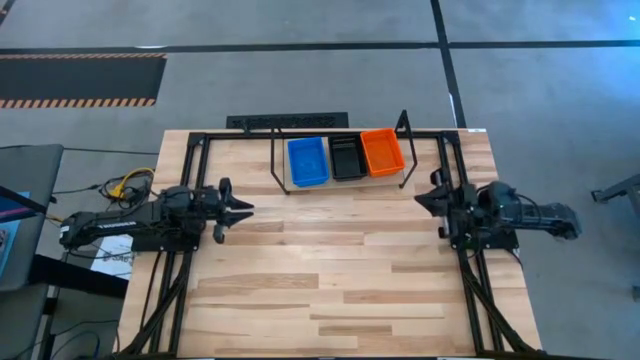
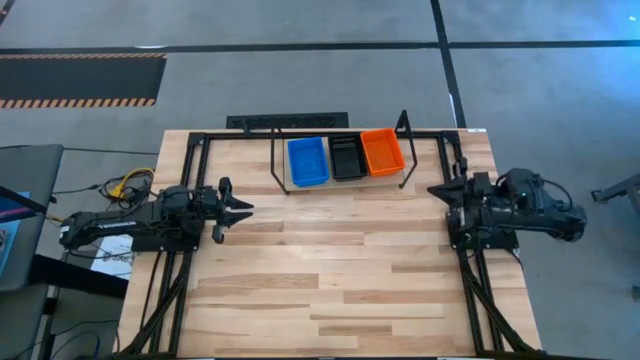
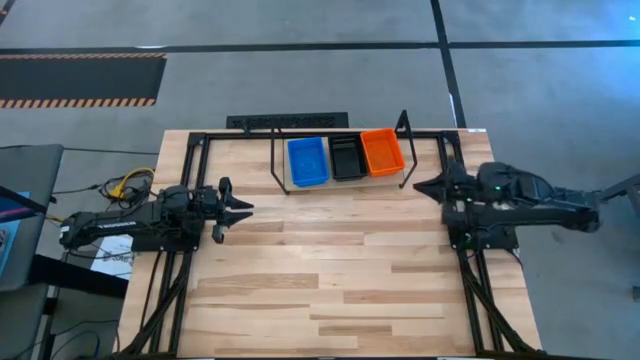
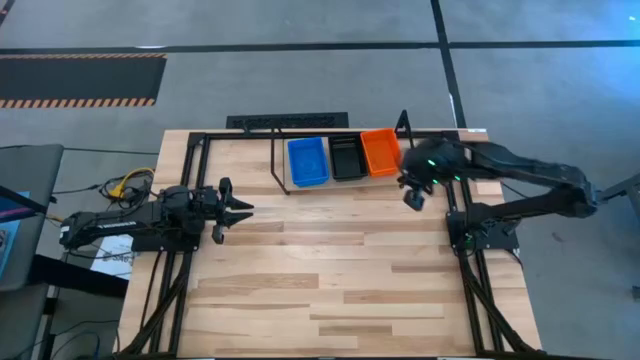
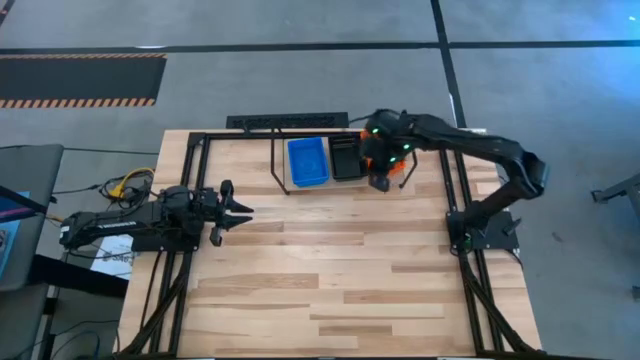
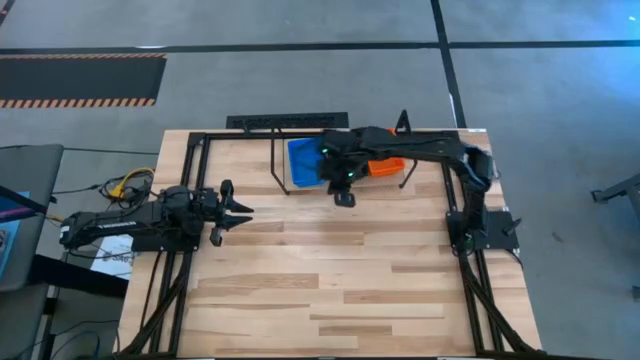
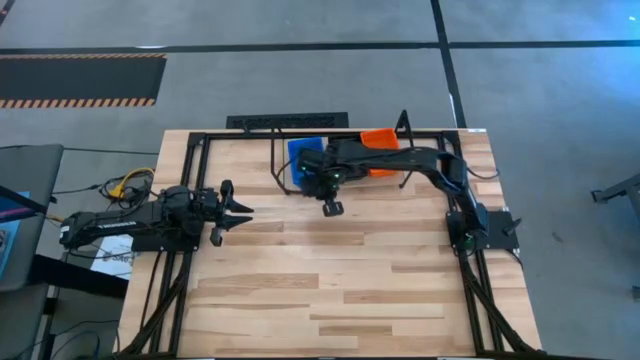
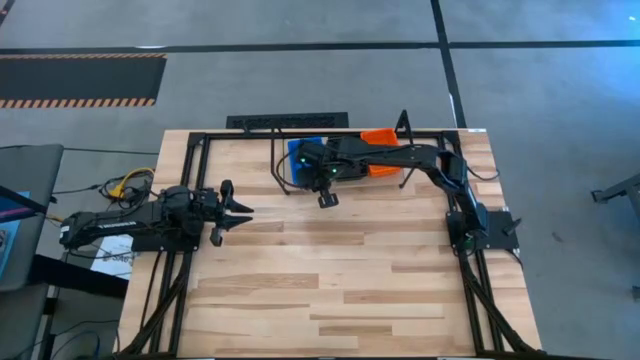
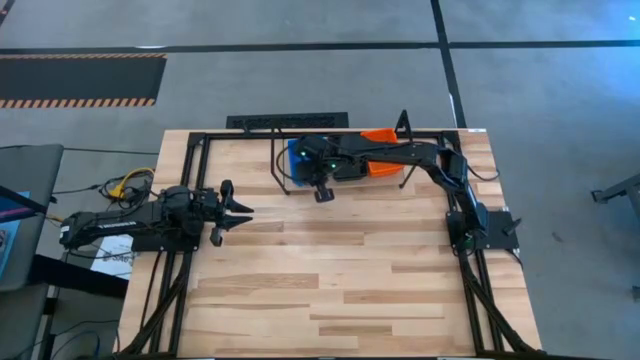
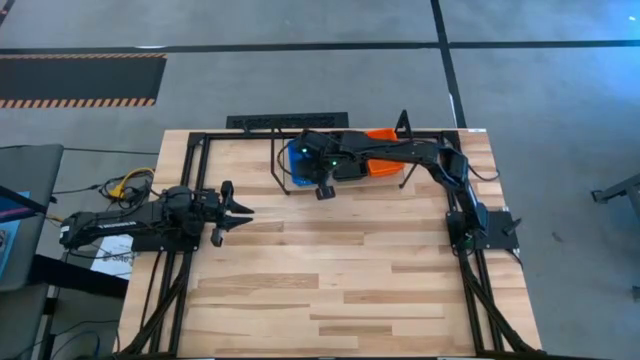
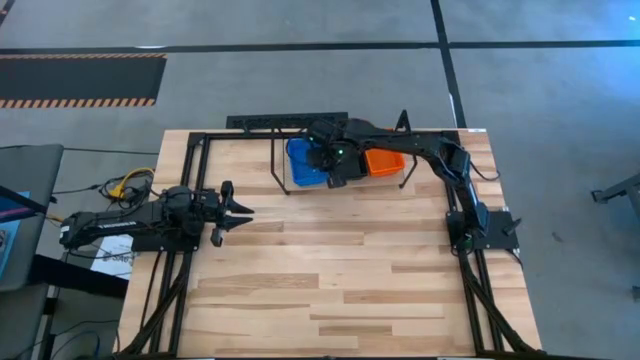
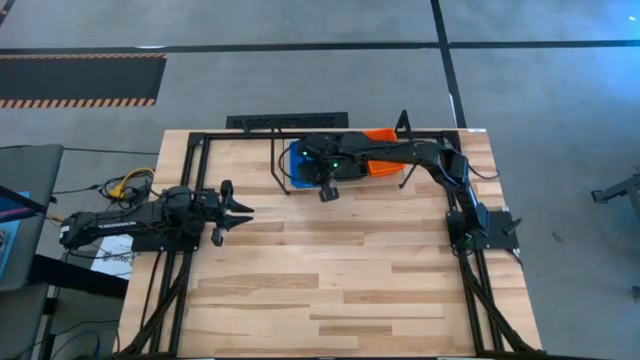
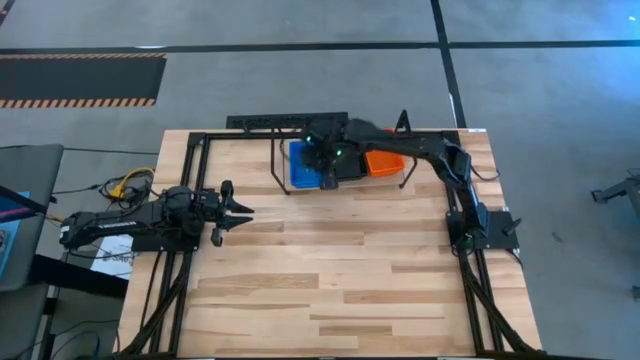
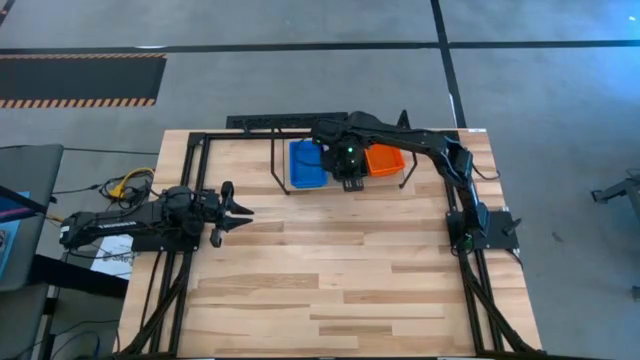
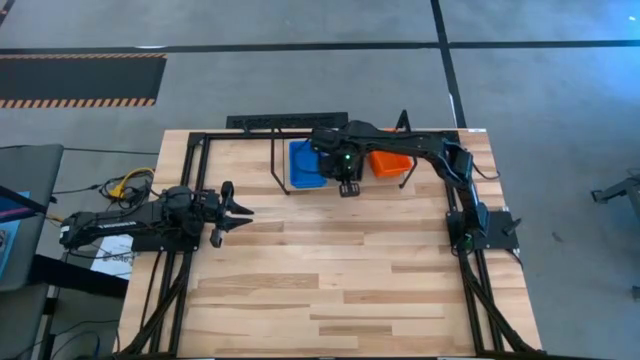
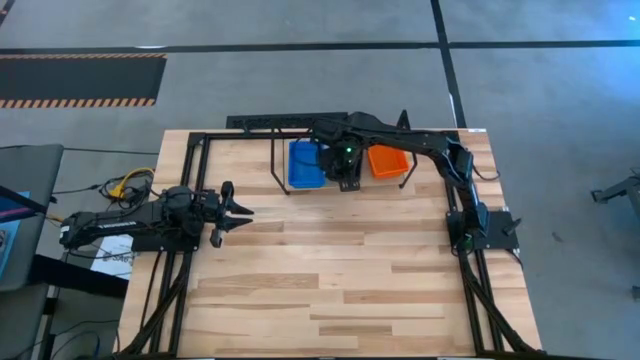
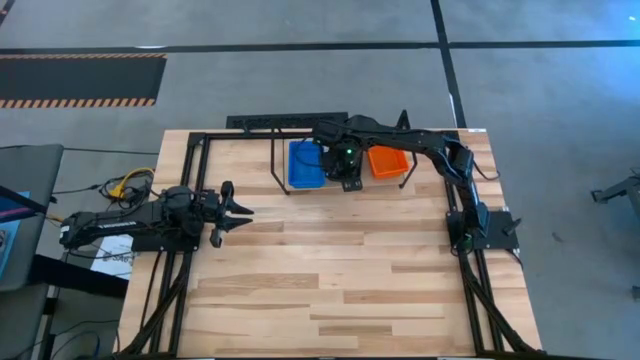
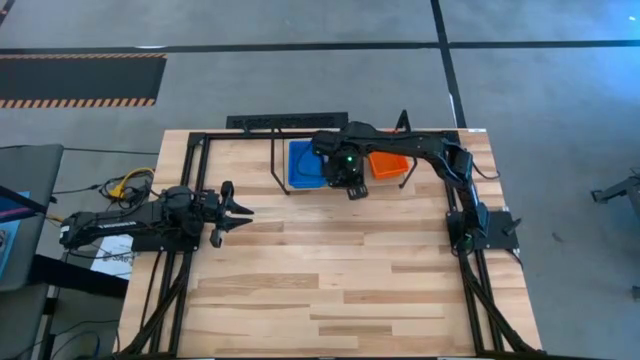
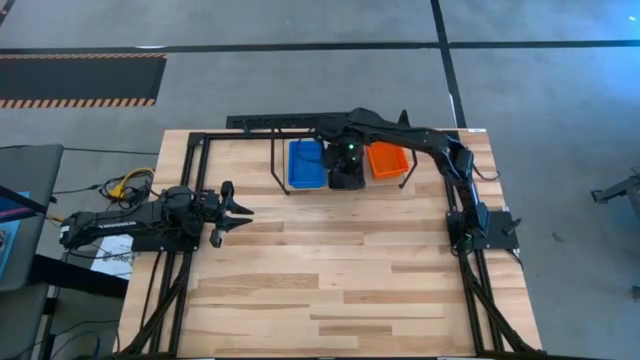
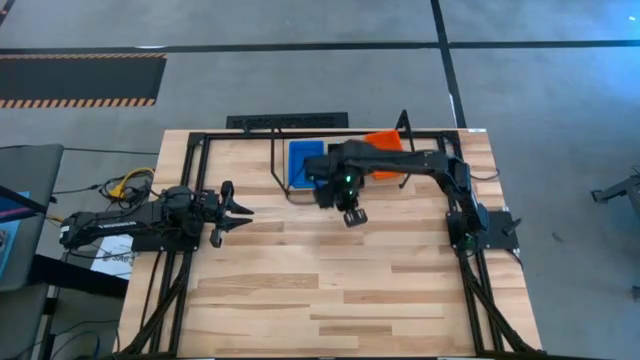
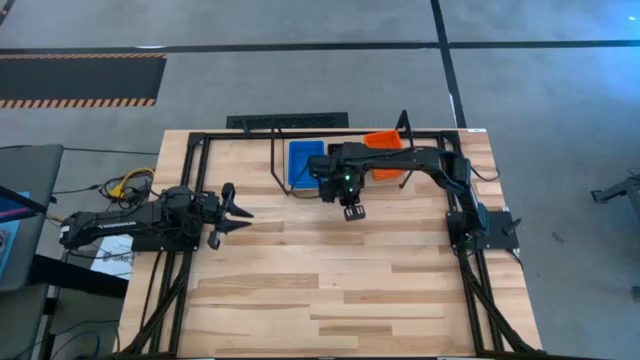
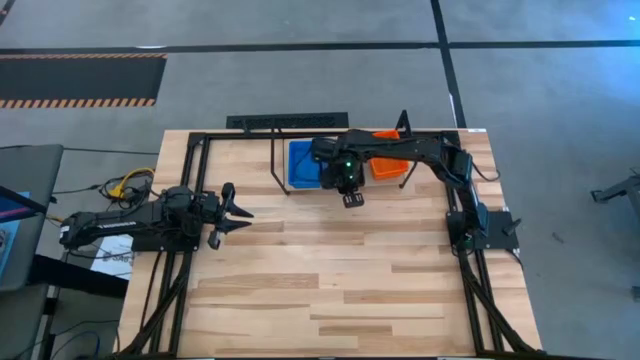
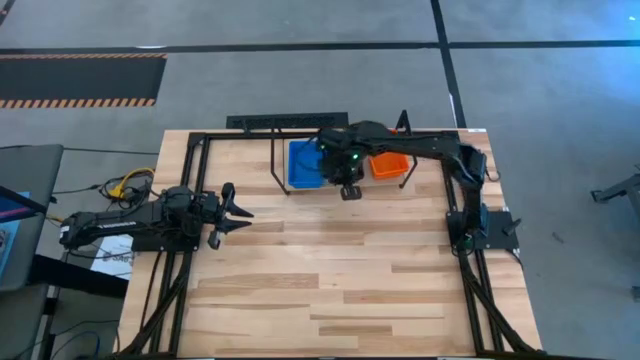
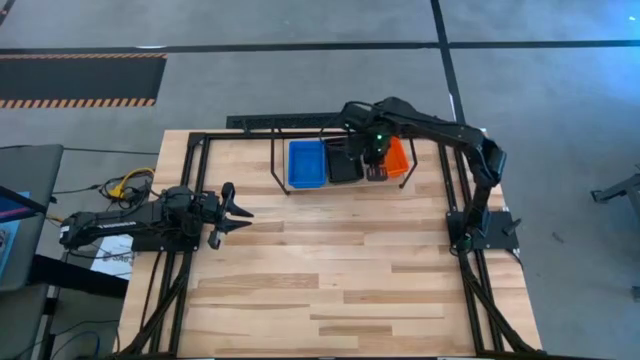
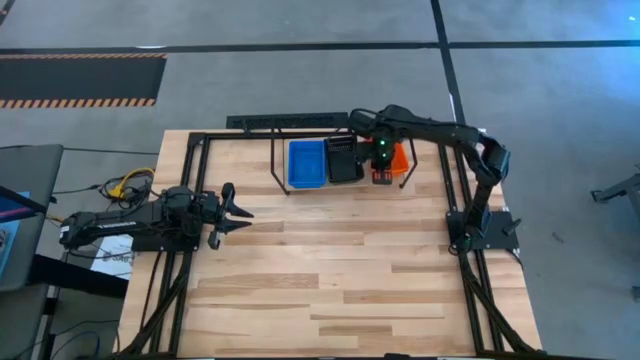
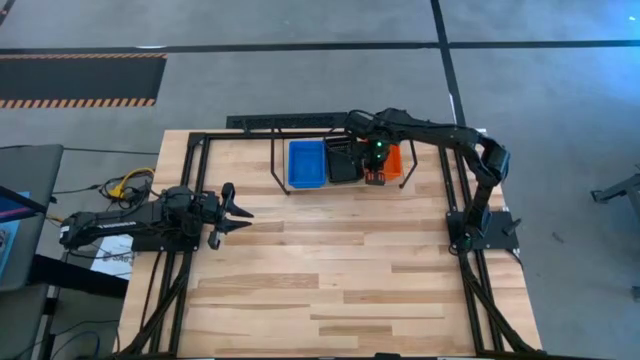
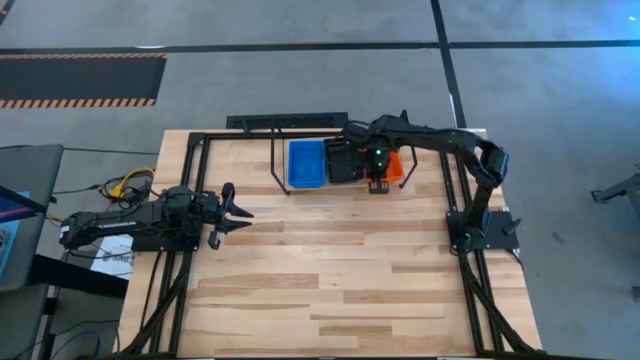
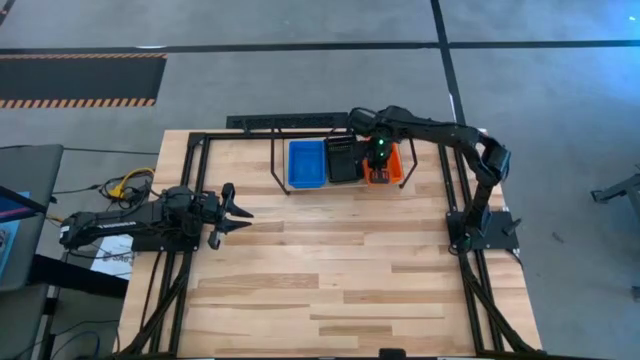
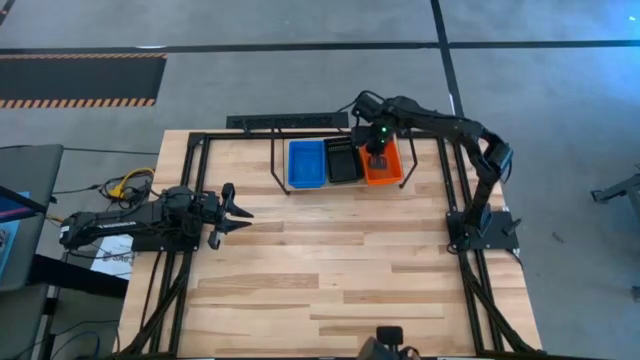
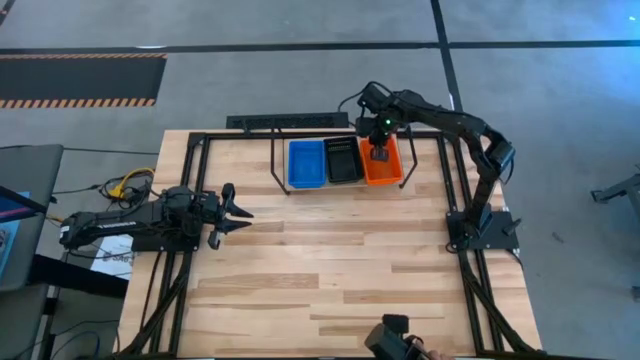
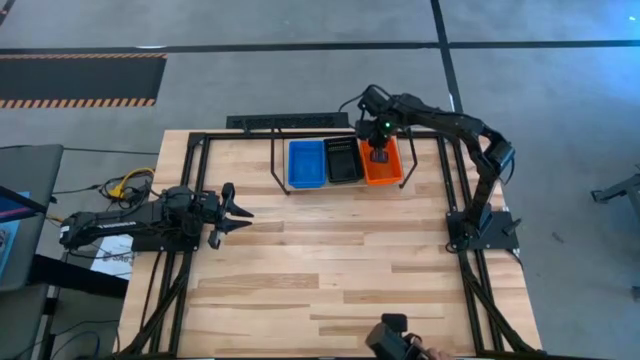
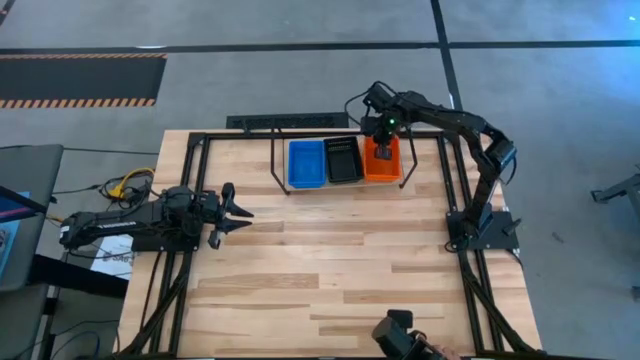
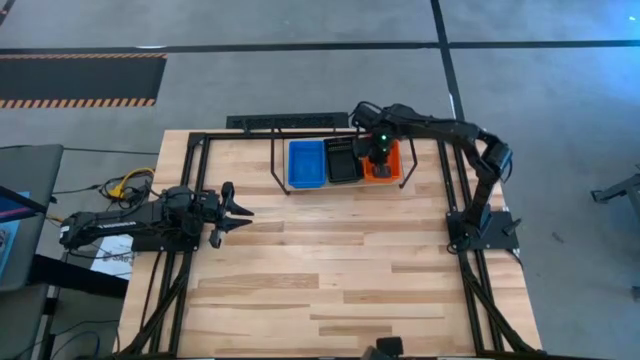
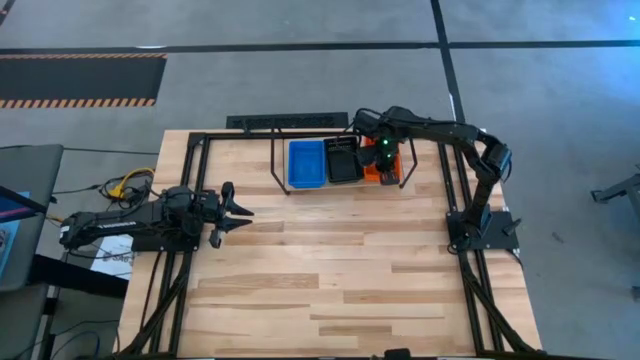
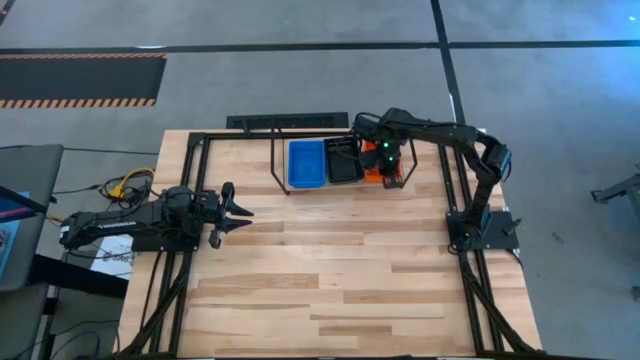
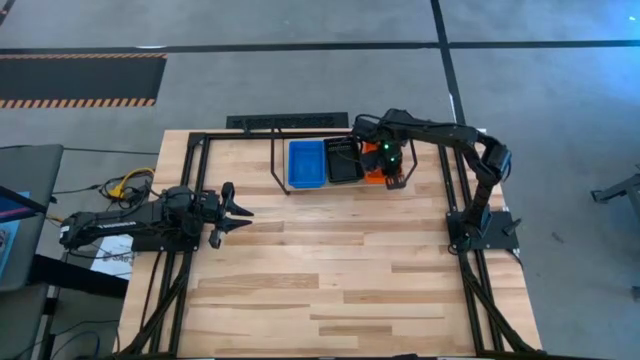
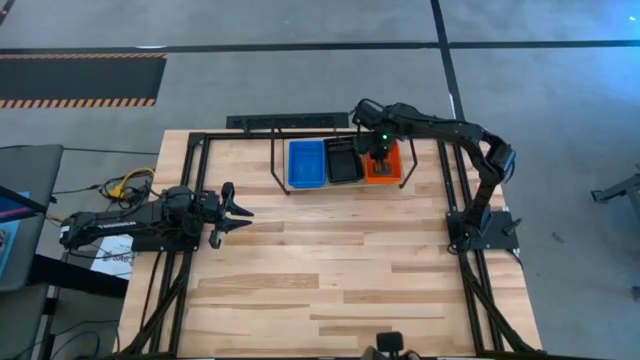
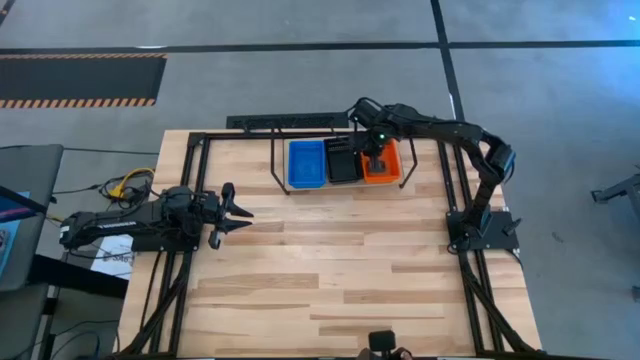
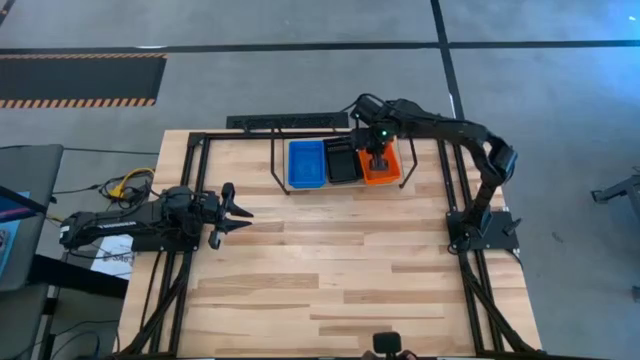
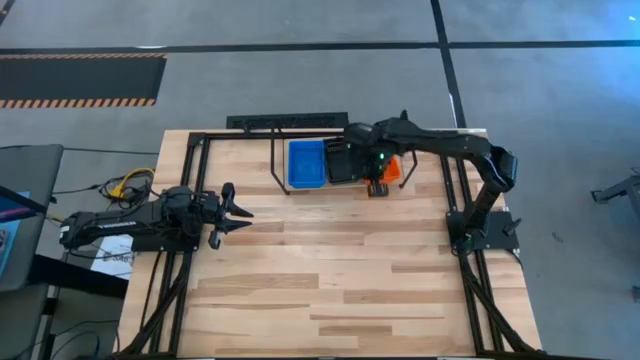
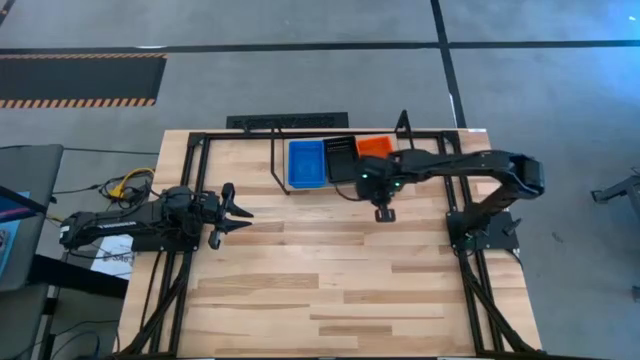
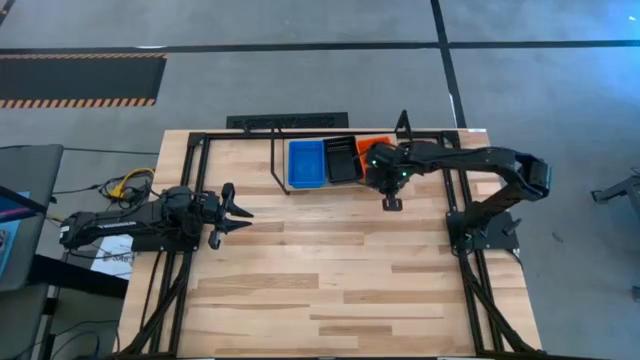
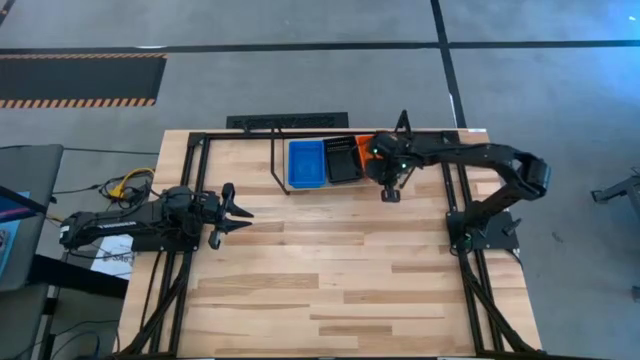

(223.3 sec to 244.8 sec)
Task: Stack baskets on shelf by color
Adjust the bins on the shelf
